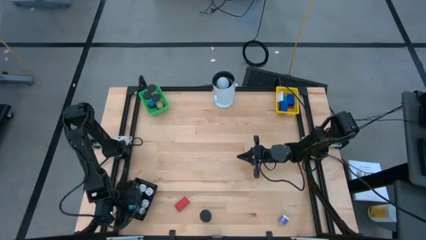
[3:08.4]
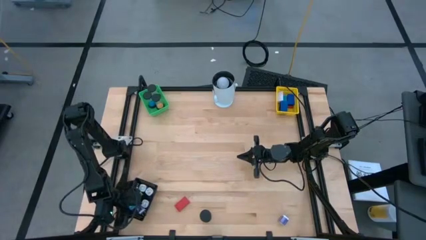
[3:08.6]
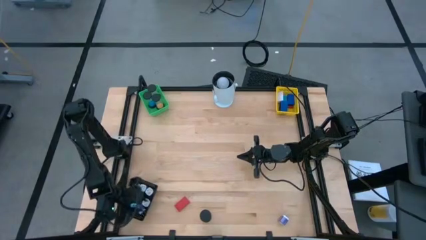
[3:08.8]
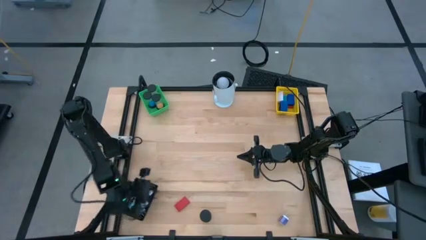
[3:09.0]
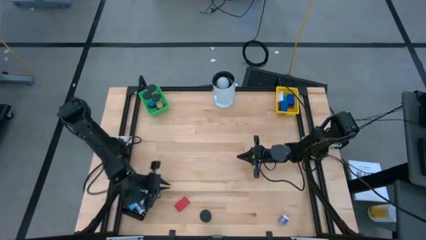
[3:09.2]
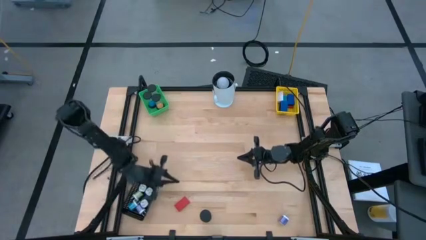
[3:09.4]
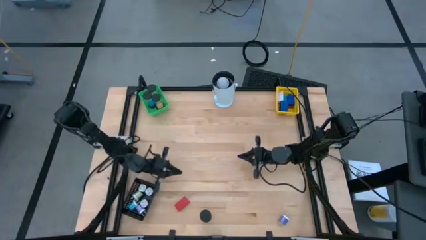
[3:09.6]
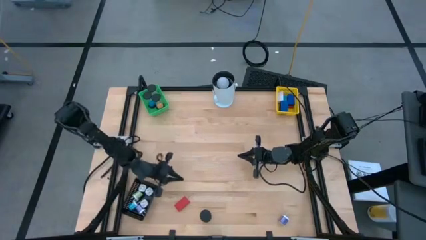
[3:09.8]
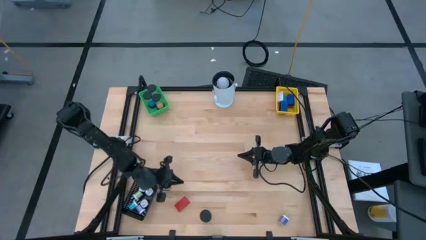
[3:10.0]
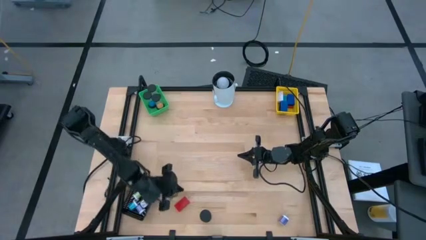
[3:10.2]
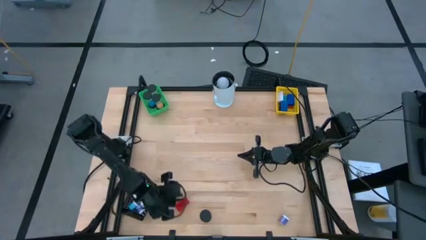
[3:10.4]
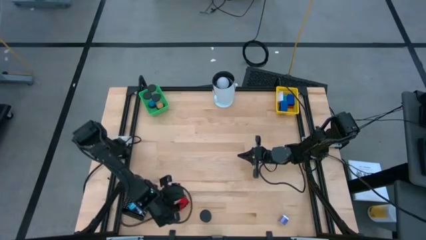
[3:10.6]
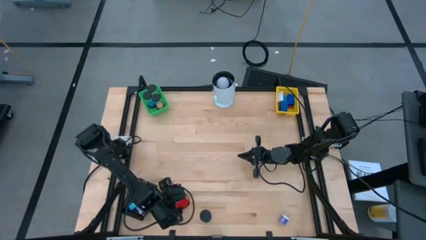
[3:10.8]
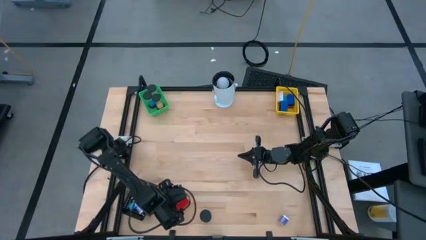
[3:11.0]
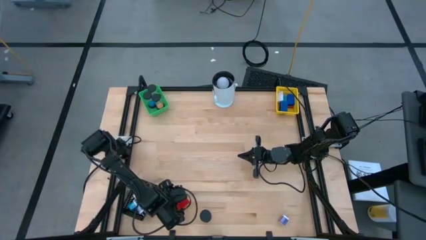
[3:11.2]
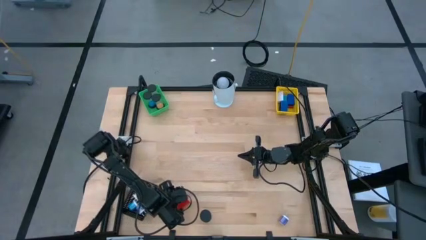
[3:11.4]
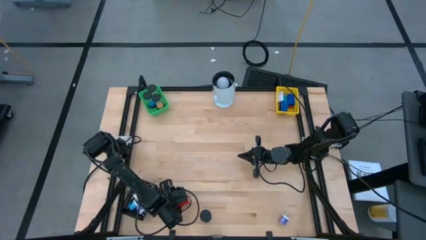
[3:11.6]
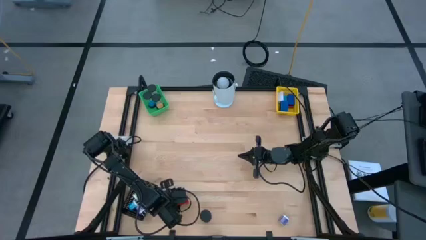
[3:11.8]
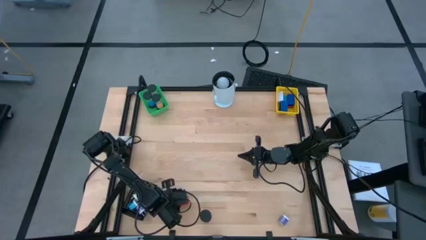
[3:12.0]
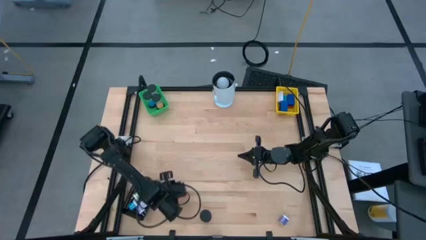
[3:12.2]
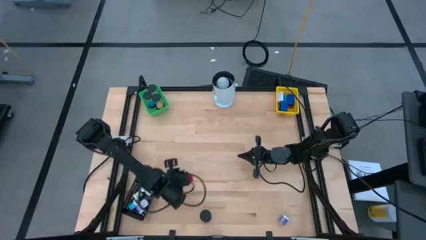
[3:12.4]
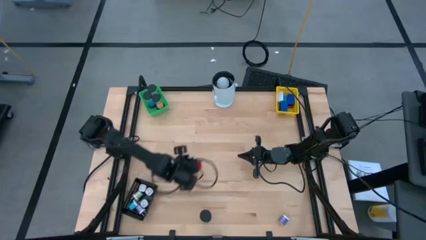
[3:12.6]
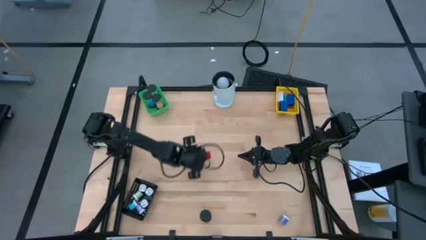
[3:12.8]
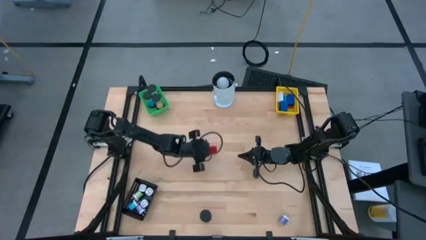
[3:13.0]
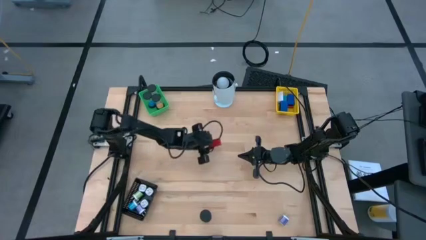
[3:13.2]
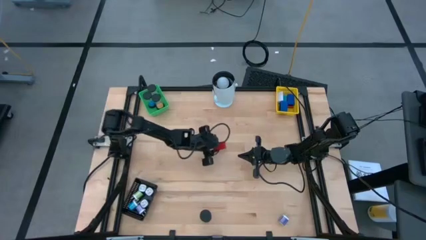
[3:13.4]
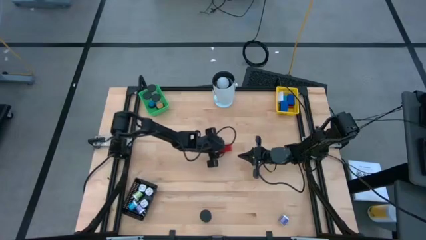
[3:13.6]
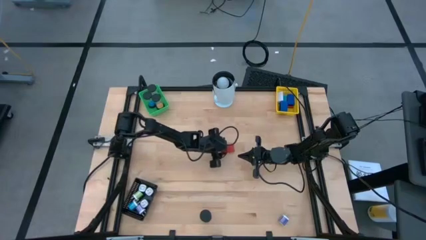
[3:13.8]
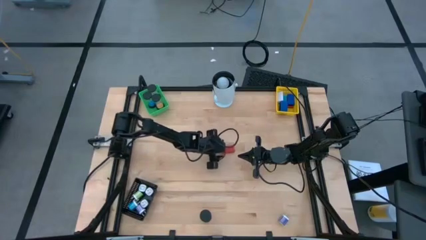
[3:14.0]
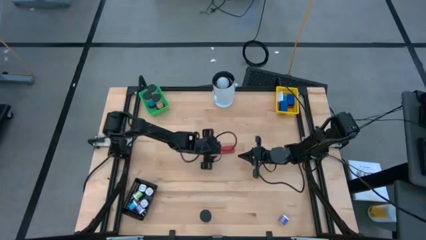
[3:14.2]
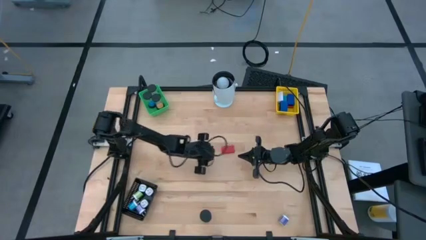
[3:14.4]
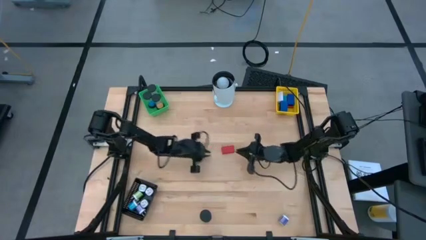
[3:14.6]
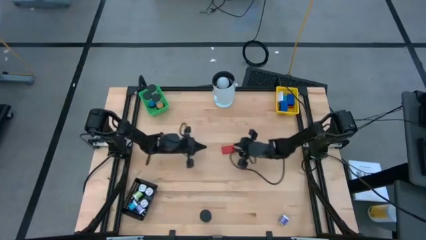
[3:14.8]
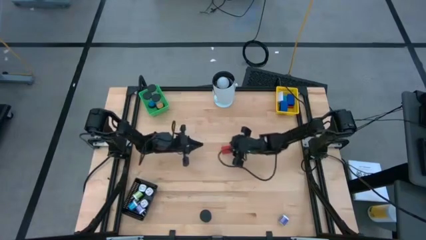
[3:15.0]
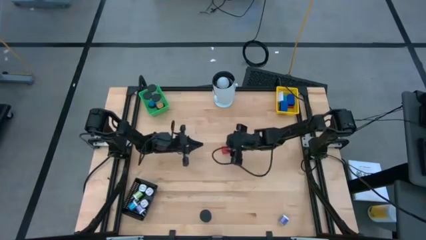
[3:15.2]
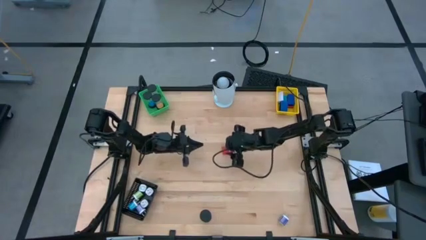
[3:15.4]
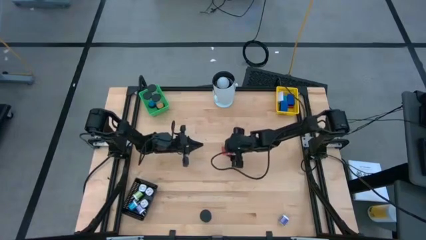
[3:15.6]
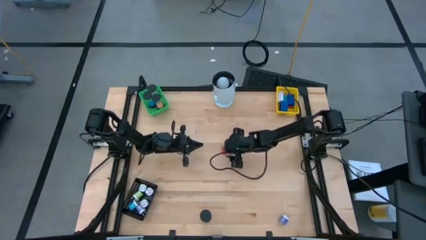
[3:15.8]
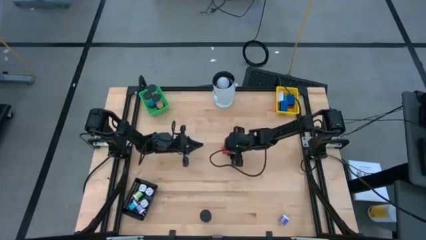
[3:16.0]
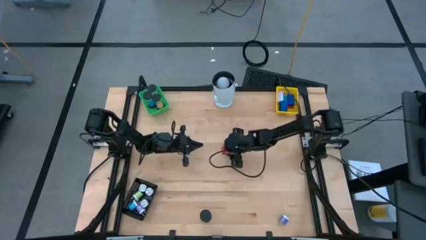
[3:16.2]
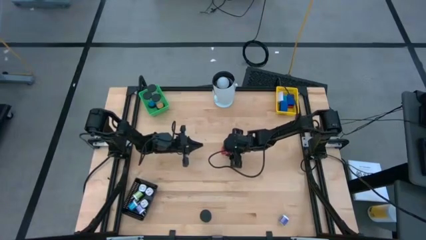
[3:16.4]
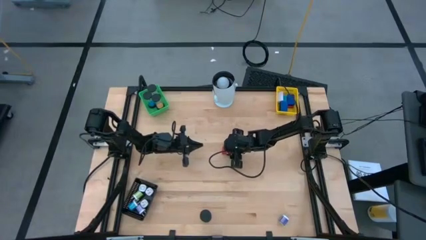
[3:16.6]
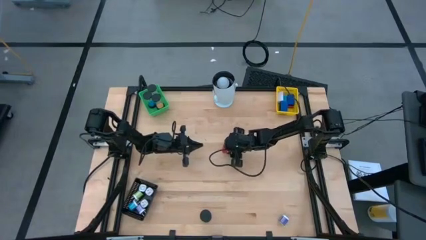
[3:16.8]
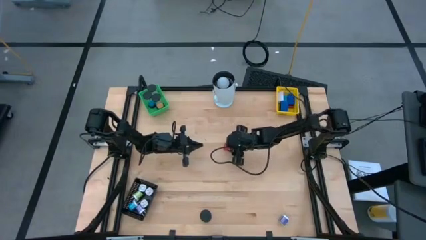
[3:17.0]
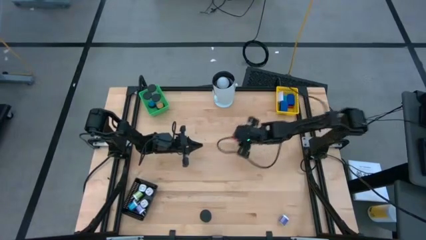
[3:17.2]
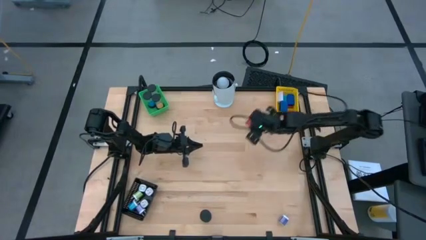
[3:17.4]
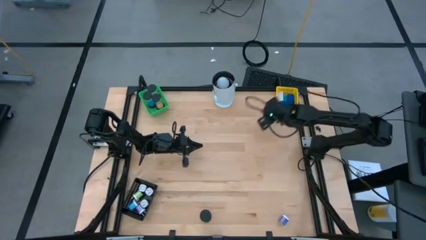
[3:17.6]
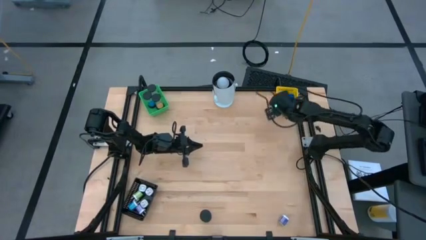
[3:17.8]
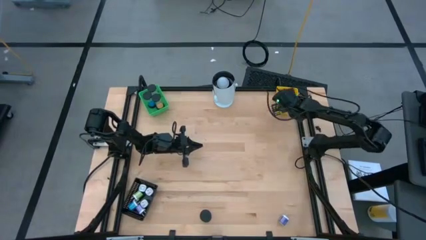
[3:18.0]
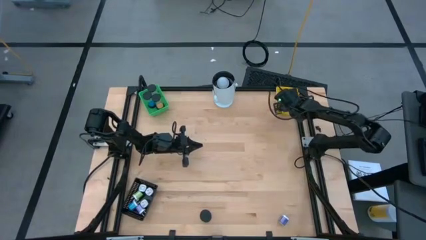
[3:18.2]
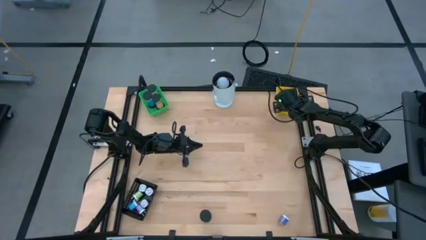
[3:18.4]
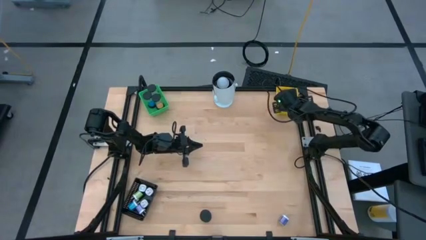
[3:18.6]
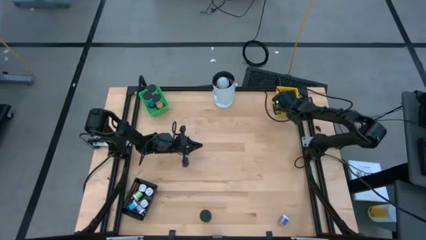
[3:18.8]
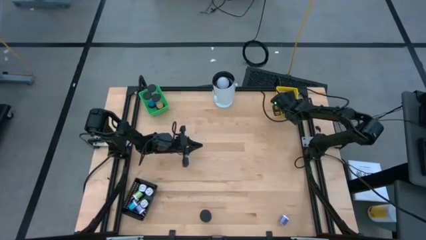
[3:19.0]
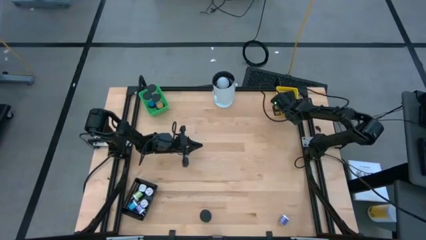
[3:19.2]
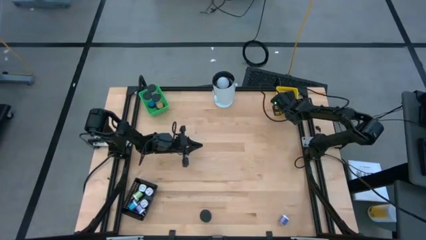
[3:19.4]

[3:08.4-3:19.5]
Task: Pick & Place Office items
Put the red digital clock into the yellow bin

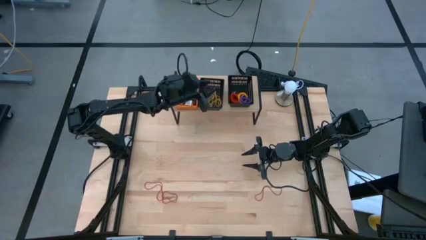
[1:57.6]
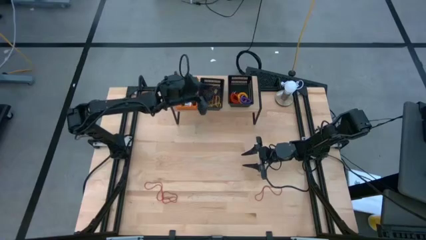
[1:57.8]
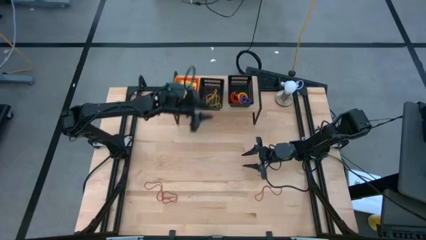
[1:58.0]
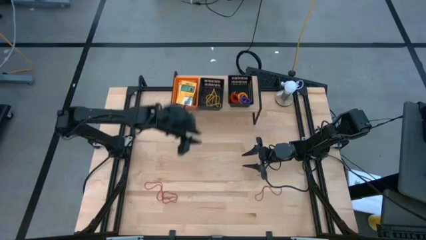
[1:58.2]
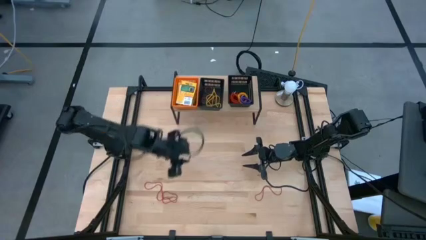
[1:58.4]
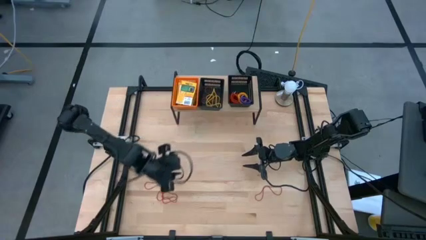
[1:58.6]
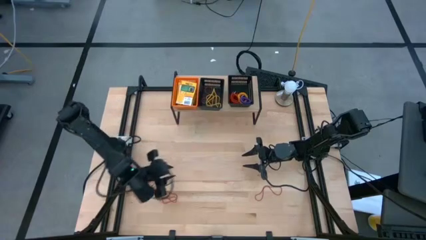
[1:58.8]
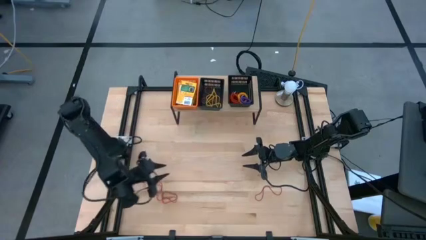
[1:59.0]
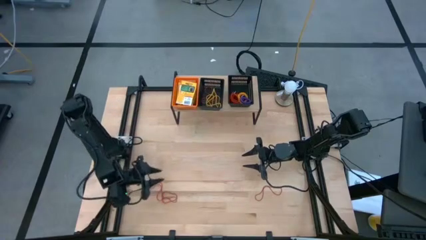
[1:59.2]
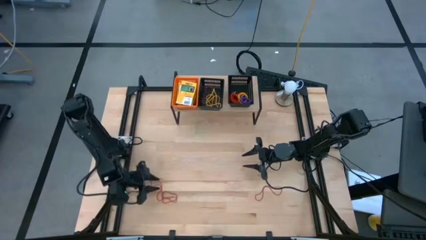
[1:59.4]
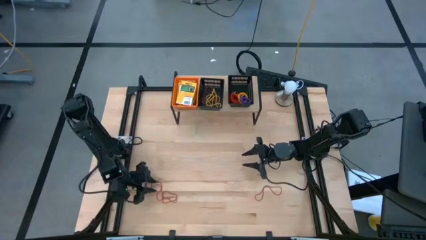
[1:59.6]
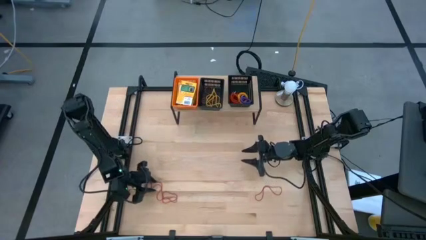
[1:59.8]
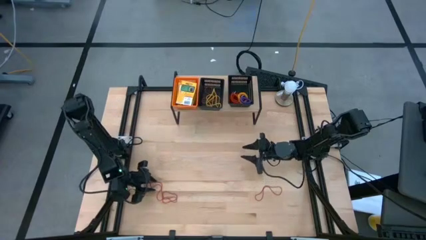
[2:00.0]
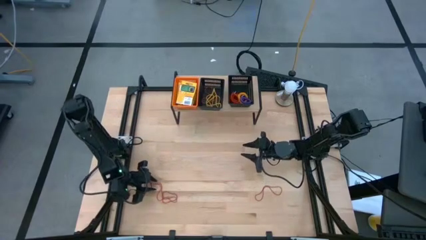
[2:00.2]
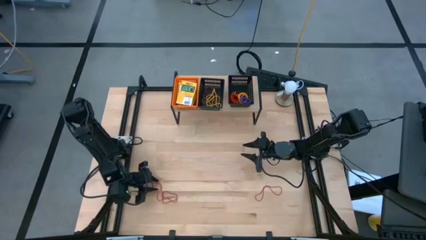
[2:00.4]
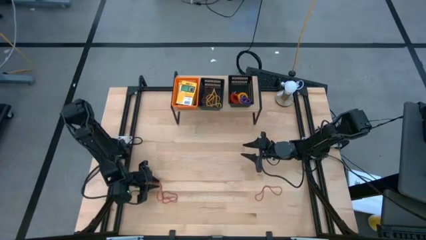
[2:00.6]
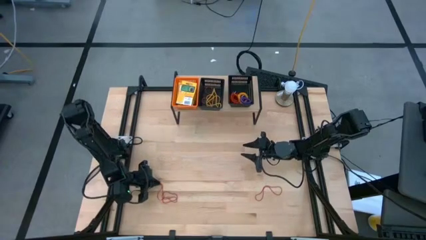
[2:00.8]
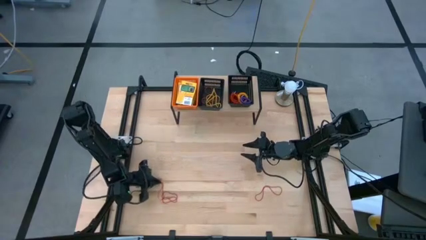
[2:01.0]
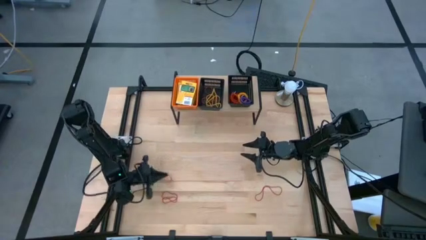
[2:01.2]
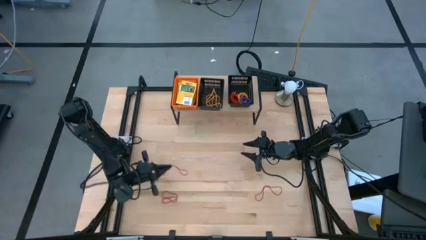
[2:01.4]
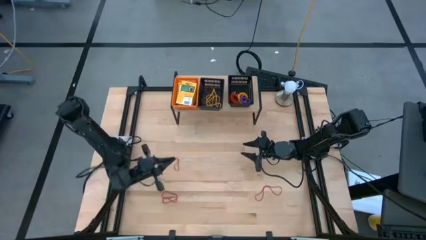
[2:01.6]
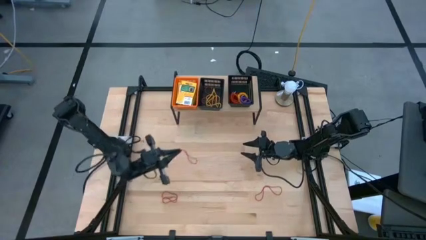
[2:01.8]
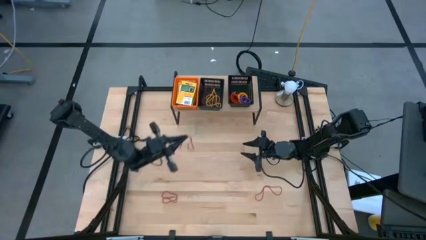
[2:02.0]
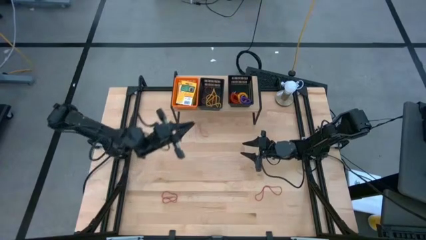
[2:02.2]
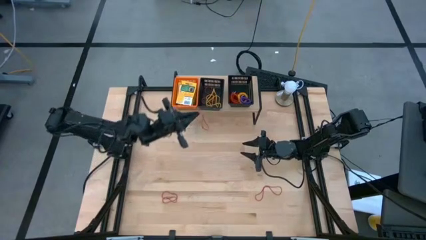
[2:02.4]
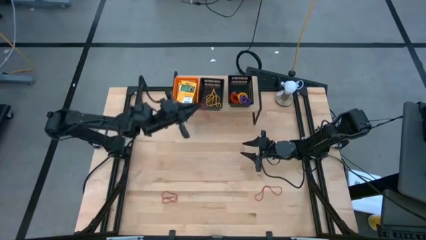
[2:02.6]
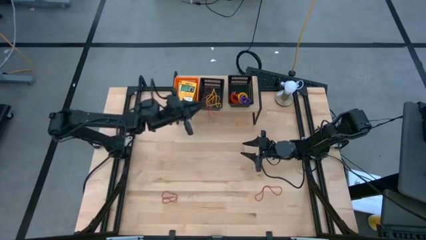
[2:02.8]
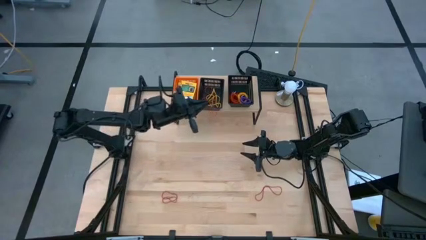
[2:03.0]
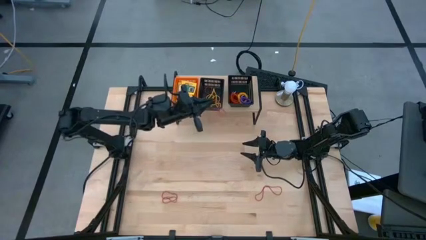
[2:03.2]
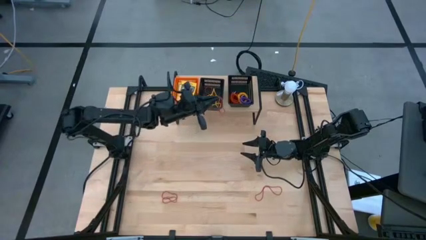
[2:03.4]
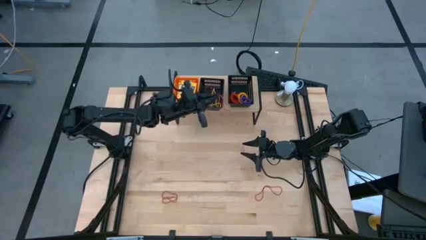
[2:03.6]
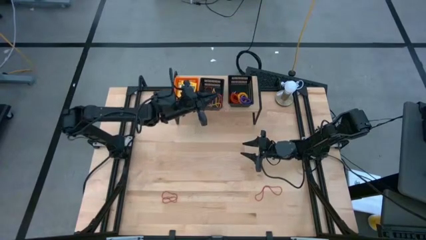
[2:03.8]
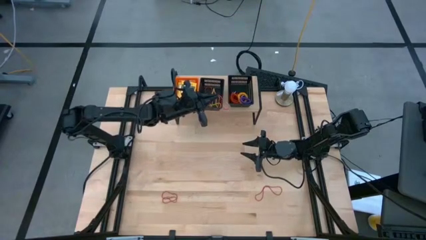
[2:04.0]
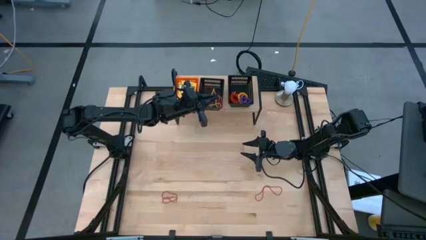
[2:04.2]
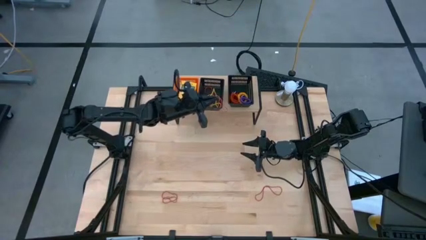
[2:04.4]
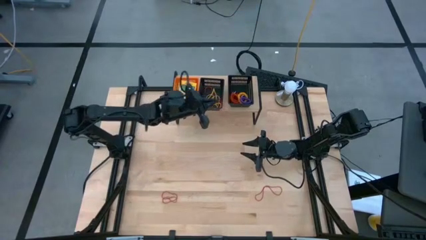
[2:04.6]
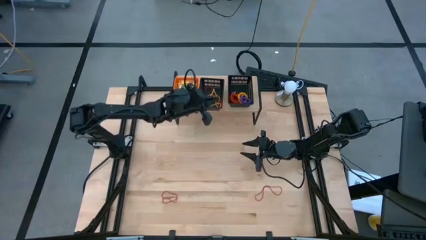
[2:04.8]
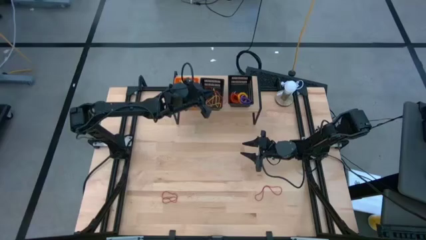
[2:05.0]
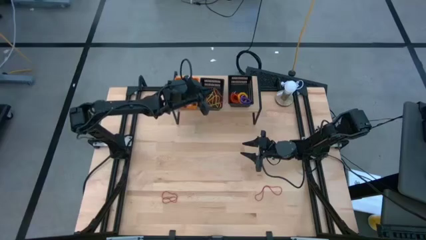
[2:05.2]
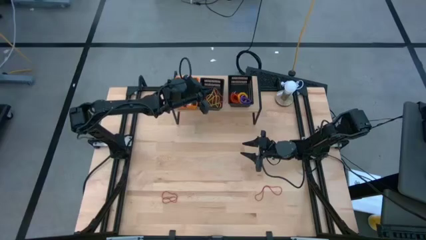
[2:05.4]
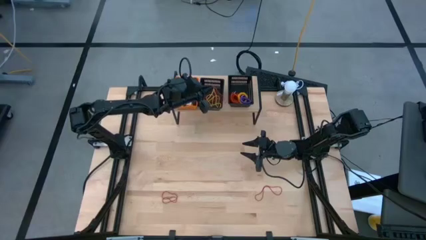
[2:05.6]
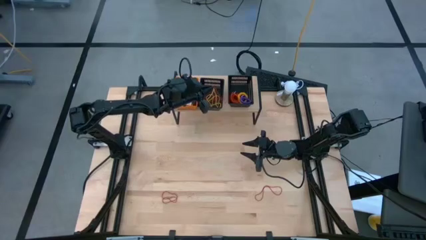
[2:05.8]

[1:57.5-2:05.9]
Task: Pick & Place Office Desk Supplies
Put the red rubber band into the left black bin on the shelf
